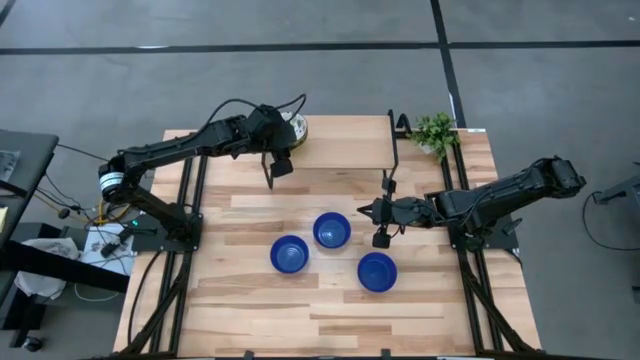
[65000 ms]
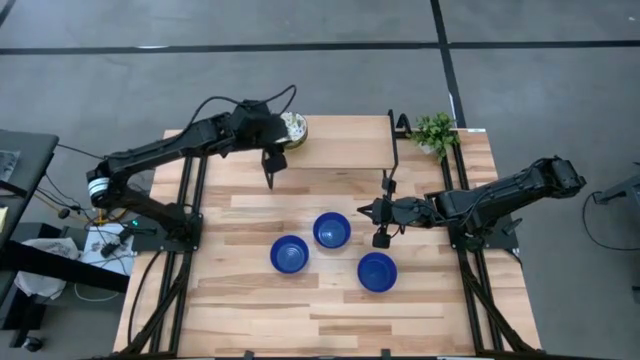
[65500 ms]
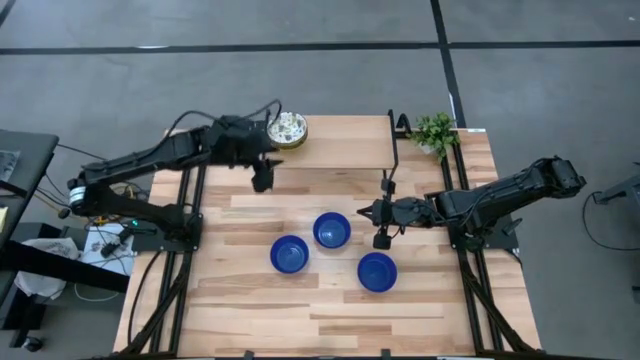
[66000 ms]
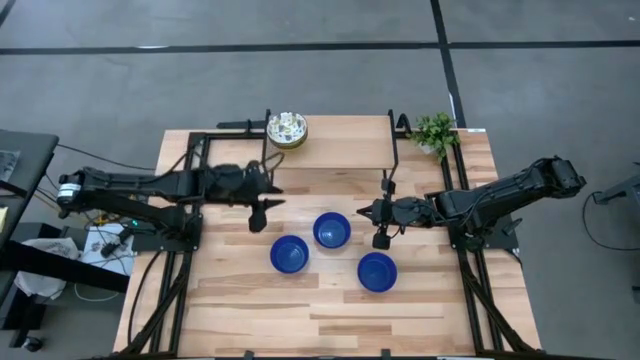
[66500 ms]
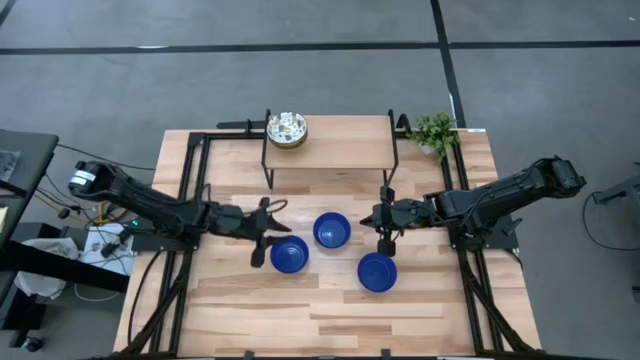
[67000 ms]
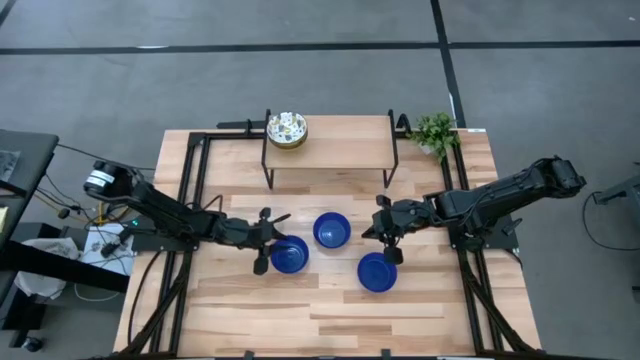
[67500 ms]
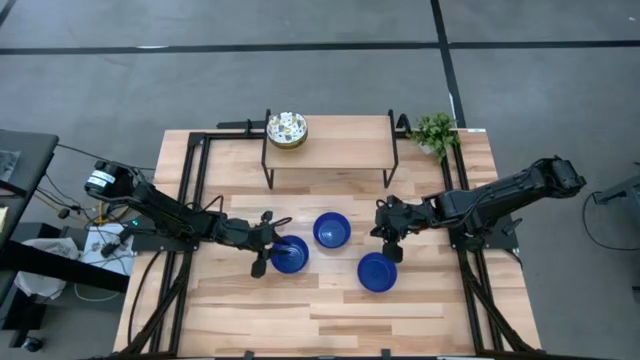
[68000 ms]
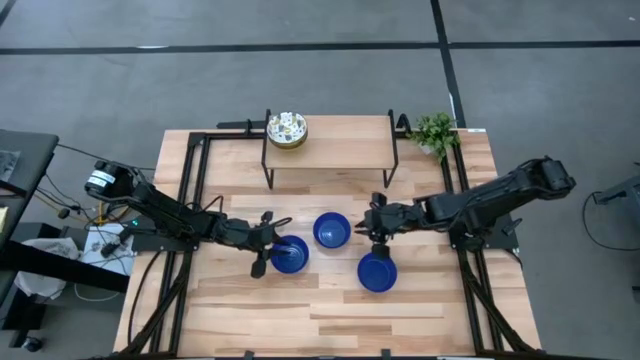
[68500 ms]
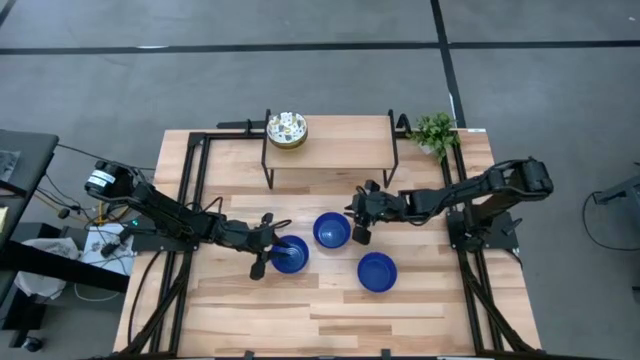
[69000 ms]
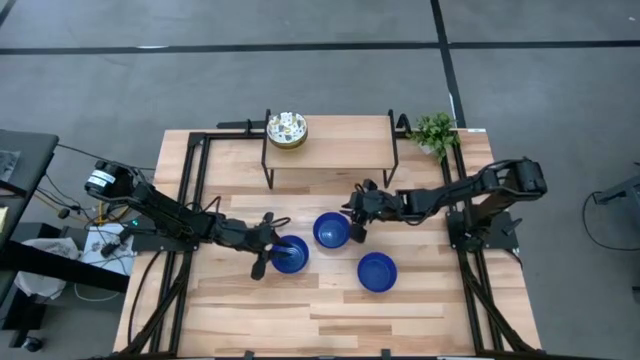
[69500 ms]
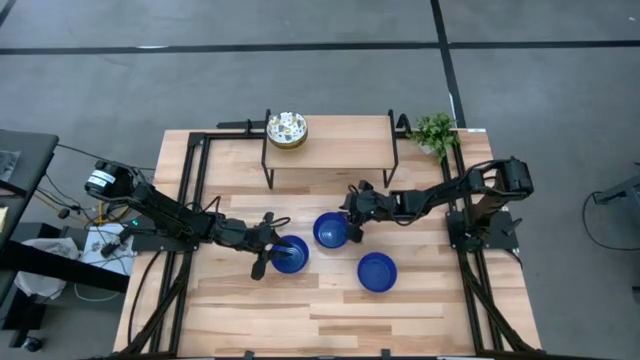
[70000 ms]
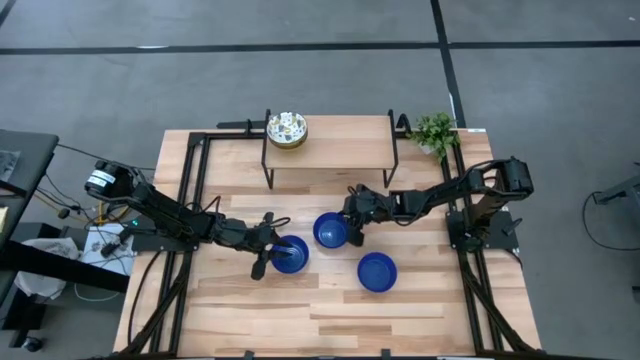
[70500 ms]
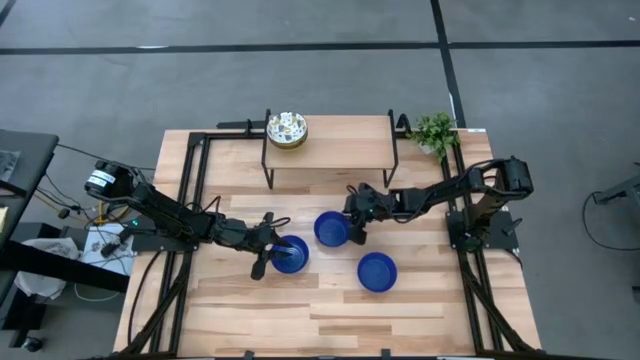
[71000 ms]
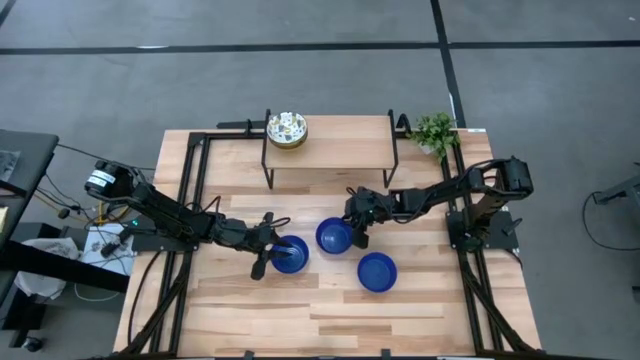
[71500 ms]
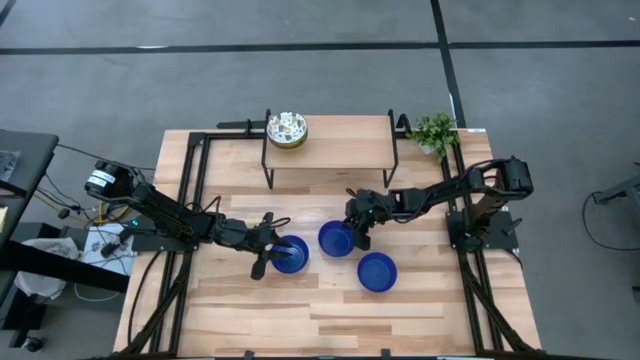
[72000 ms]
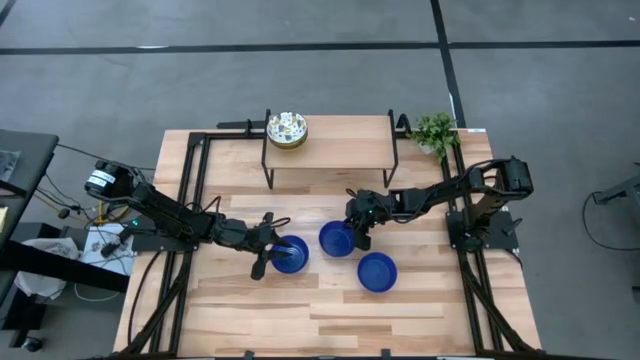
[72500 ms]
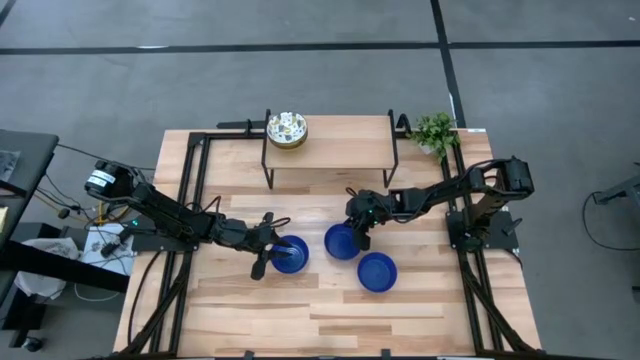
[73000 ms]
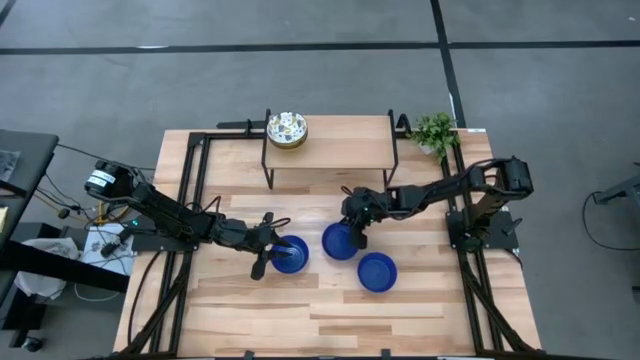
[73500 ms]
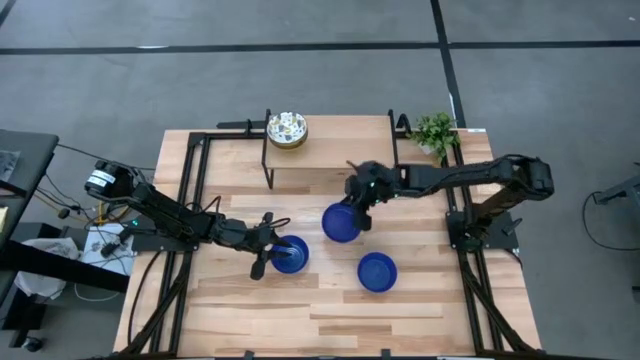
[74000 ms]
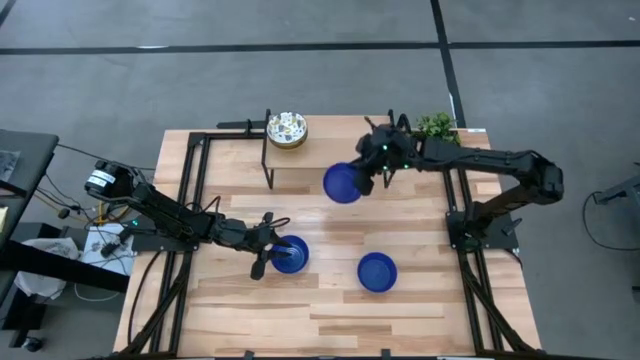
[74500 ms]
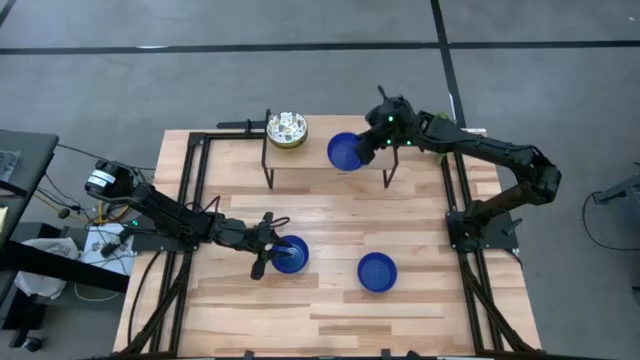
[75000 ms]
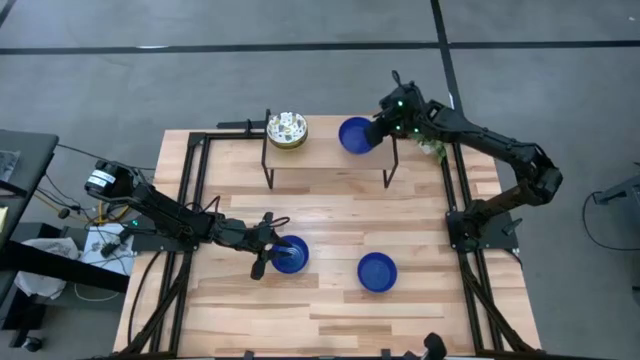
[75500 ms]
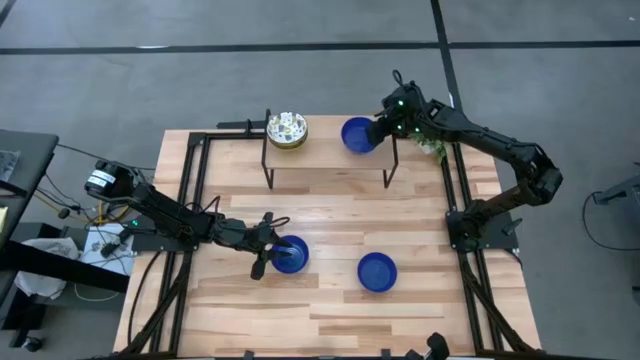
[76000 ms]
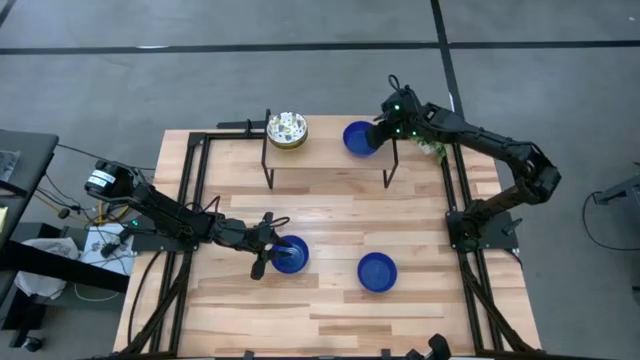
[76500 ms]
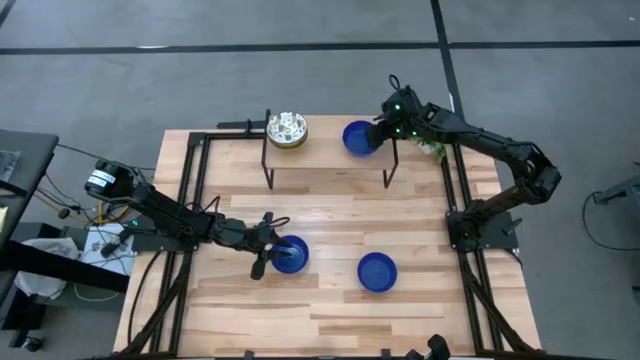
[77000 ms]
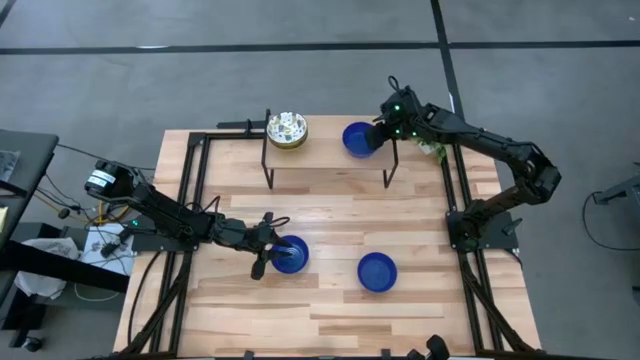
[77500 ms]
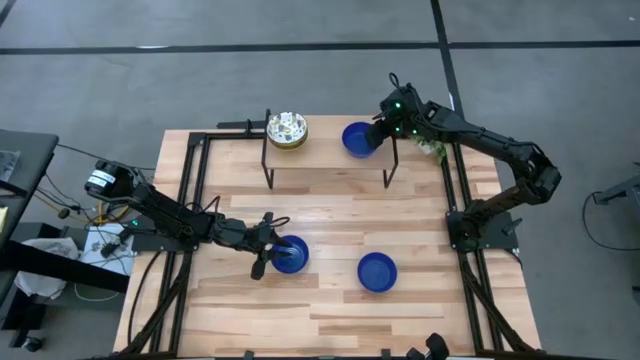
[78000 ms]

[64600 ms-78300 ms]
Task: Pick & Place Mini bowls
Put the blue bowl on the shelf

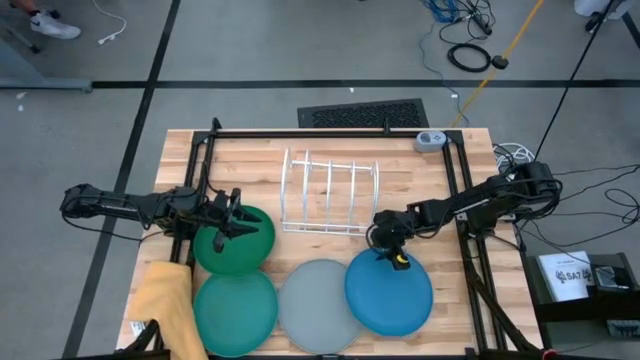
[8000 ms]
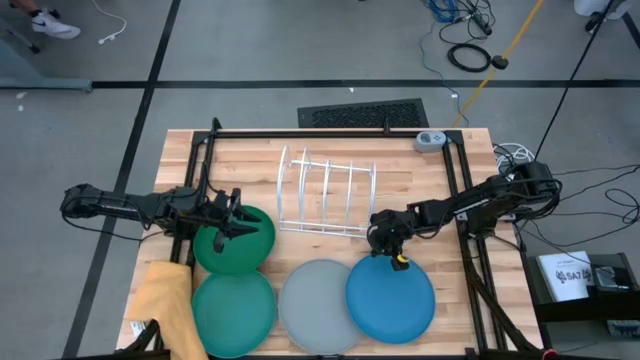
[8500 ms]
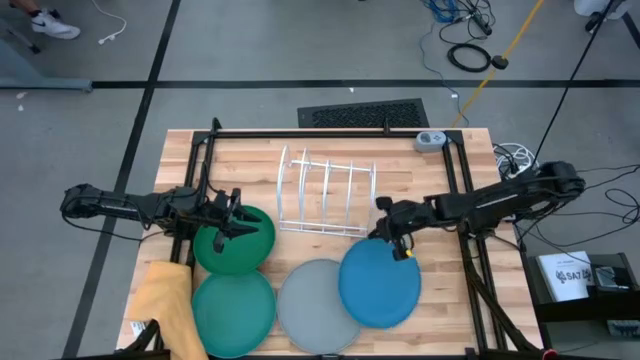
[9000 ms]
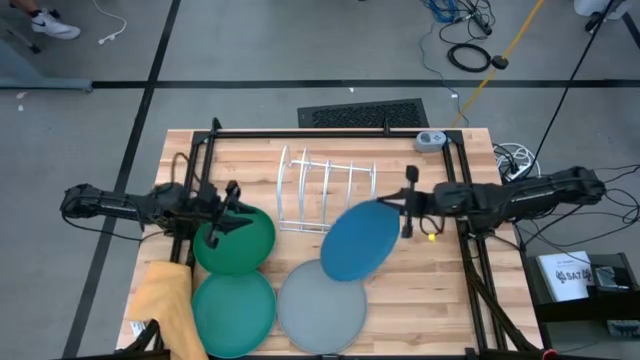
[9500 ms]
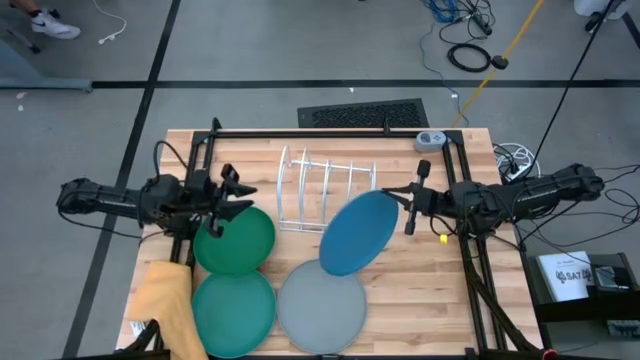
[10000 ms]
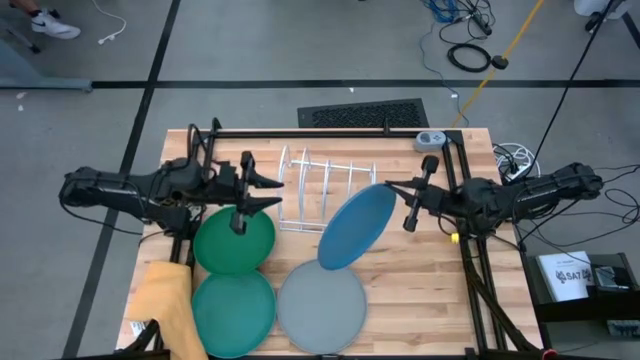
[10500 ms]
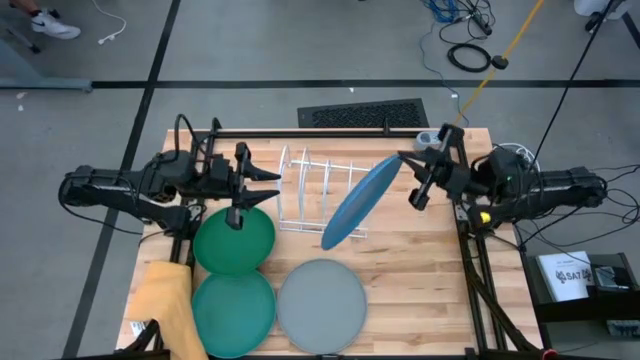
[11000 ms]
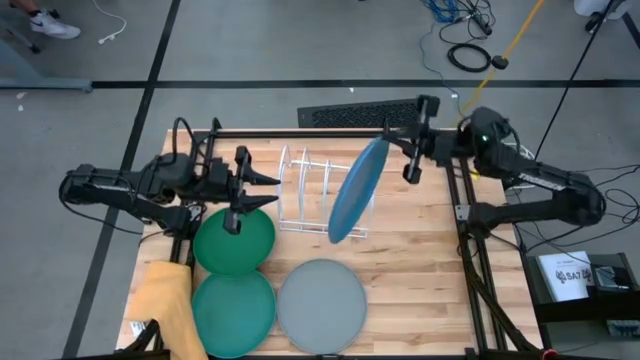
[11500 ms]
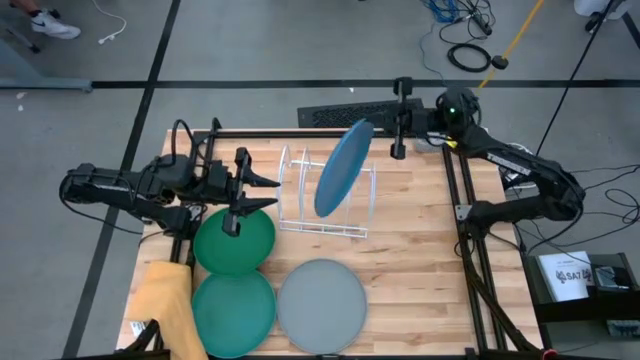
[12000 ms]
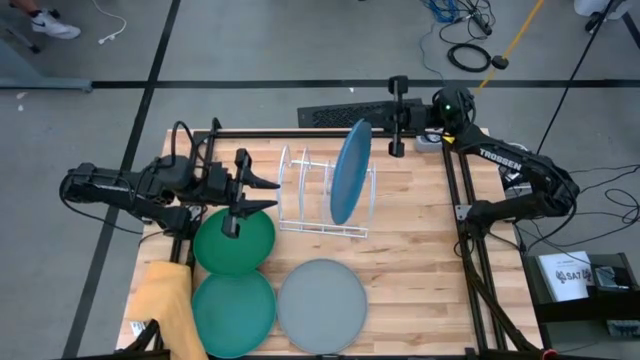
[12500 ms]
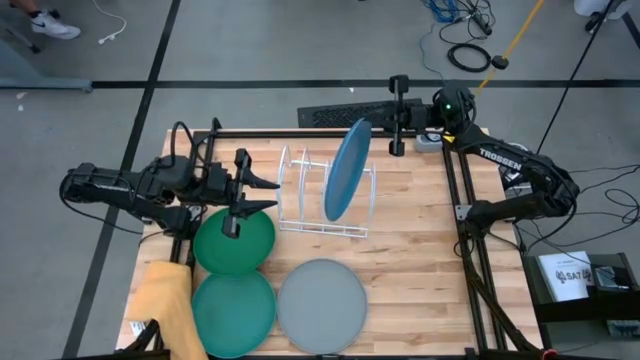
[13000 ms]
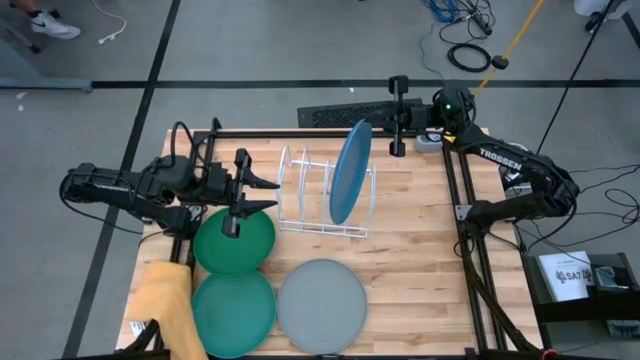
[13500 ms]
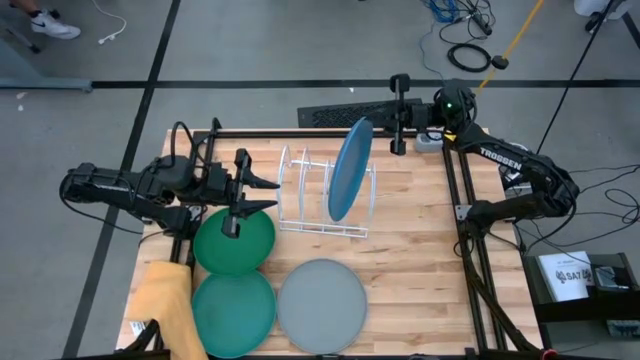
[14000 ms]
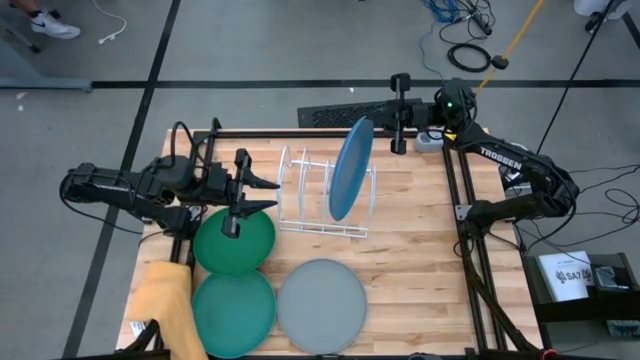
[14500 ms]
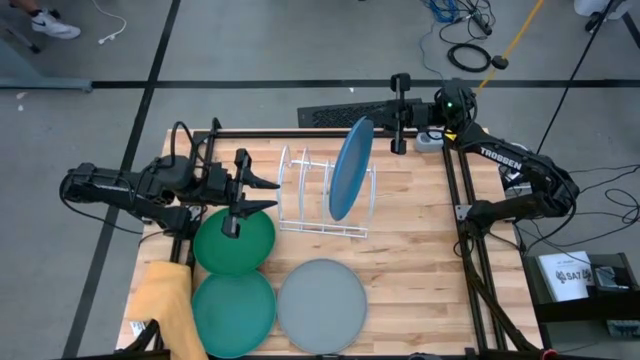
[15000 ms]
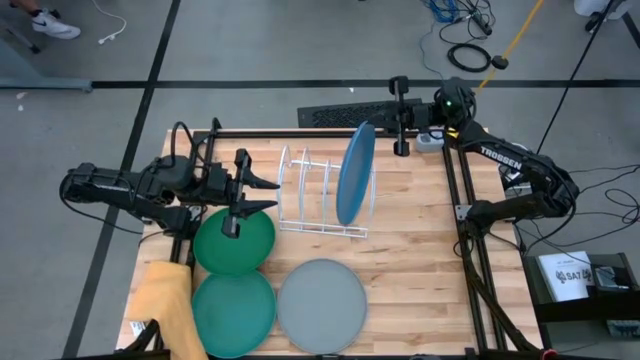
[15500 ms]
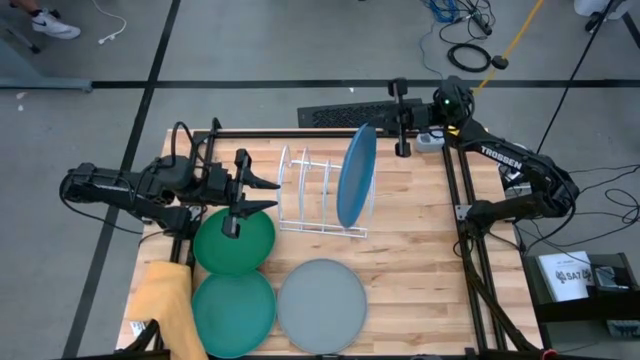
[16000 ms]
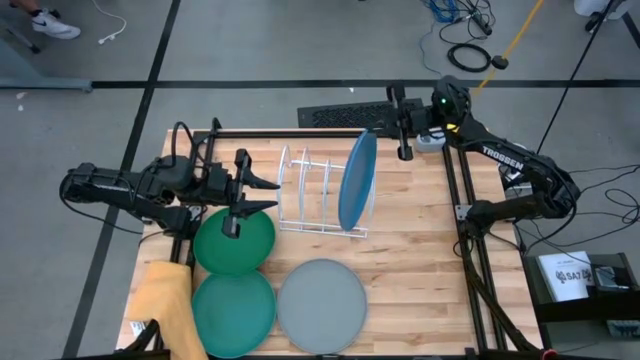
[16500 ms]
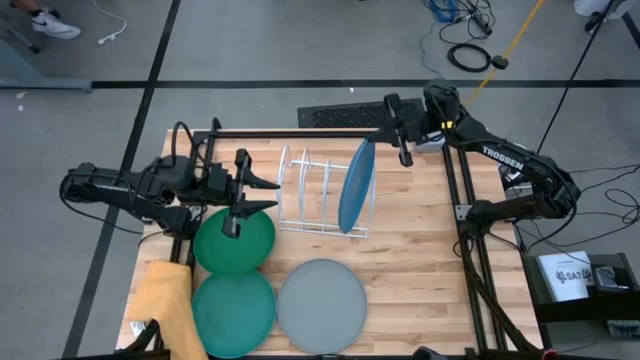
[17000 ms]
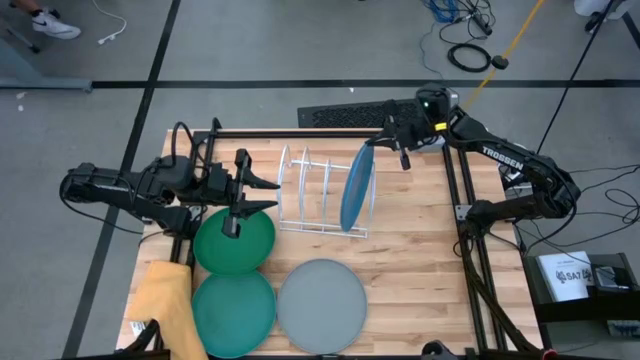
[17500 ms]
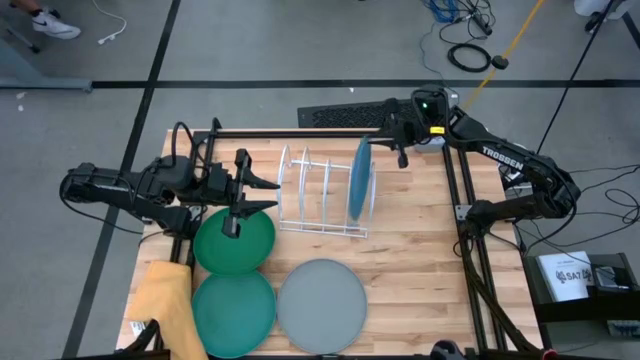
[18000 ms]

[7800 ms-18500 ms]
Task: Sort dishes
Put the blue plate in the dish rack
